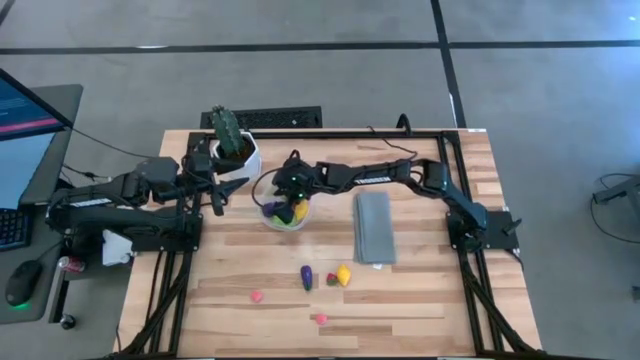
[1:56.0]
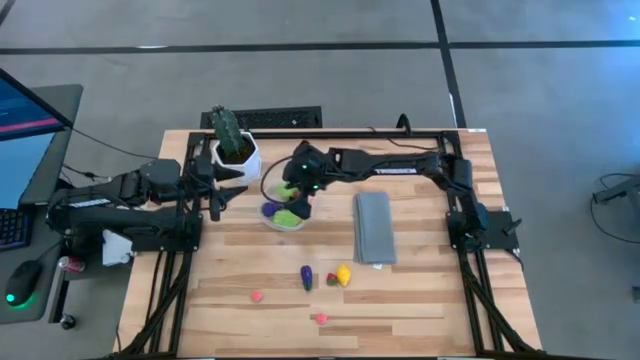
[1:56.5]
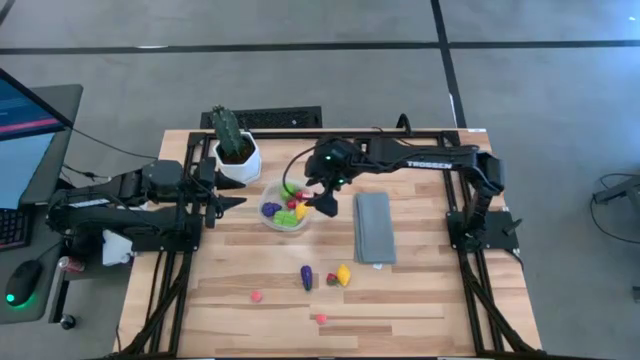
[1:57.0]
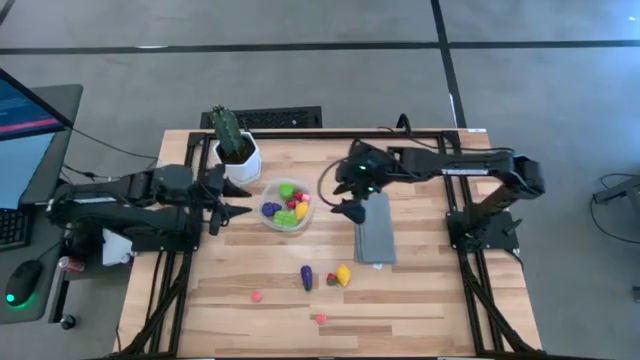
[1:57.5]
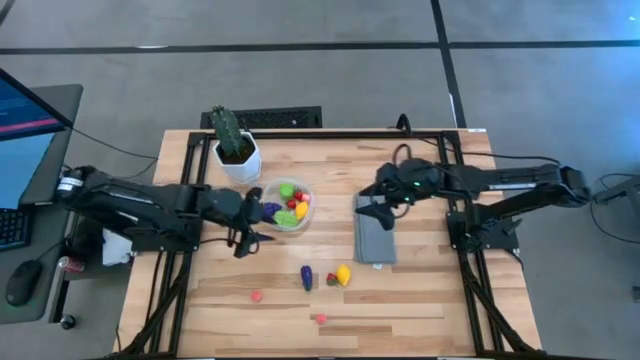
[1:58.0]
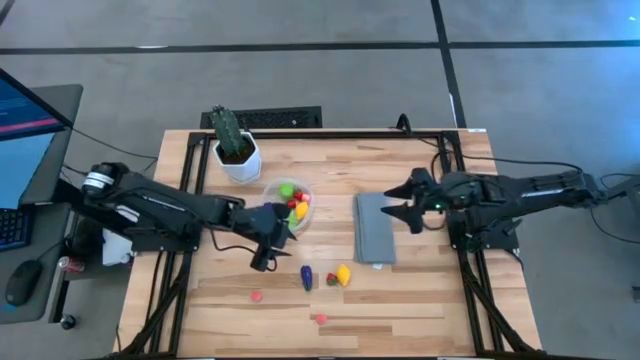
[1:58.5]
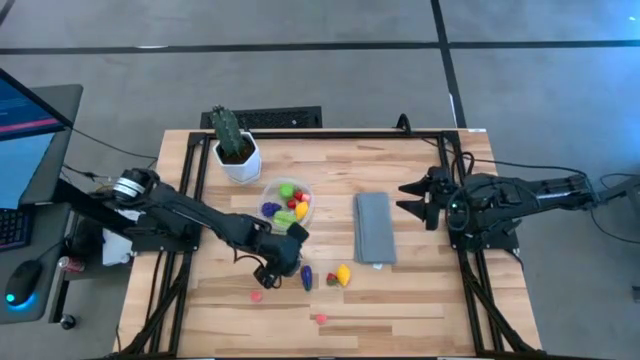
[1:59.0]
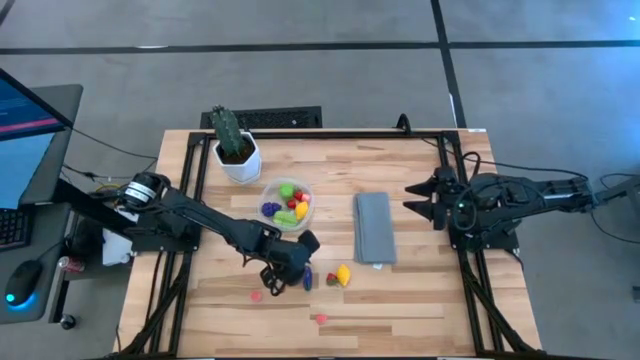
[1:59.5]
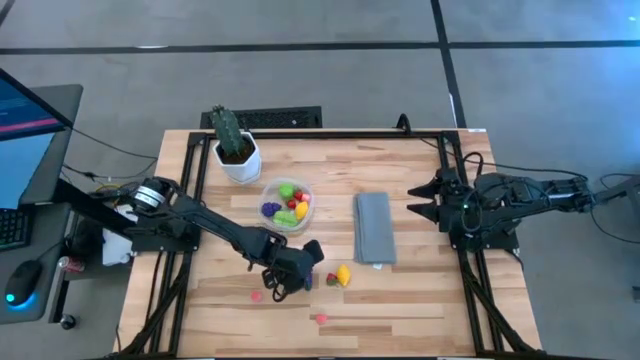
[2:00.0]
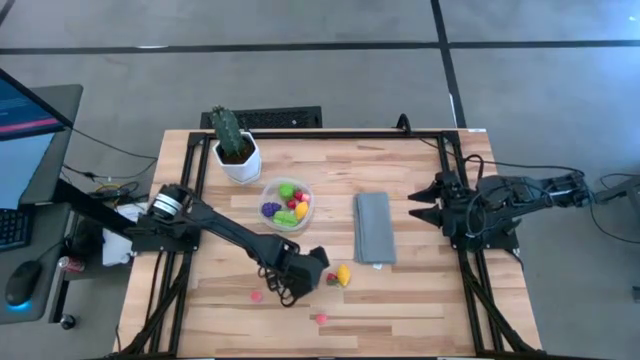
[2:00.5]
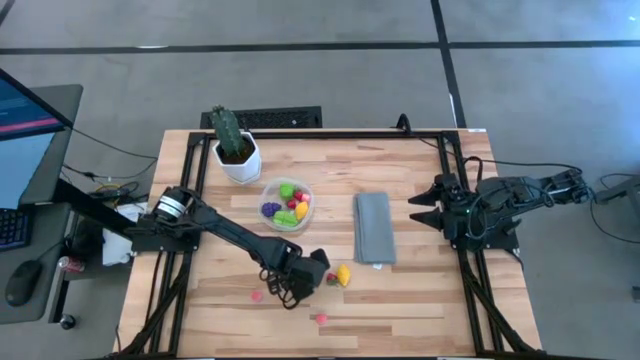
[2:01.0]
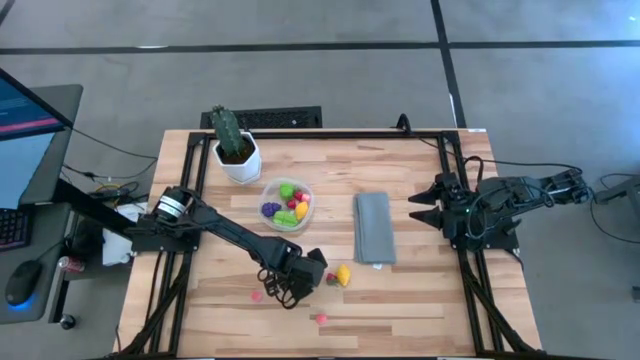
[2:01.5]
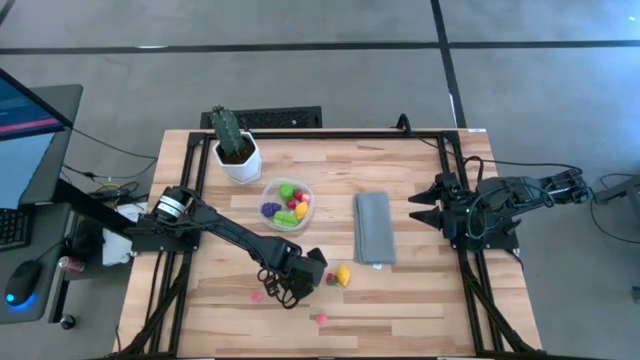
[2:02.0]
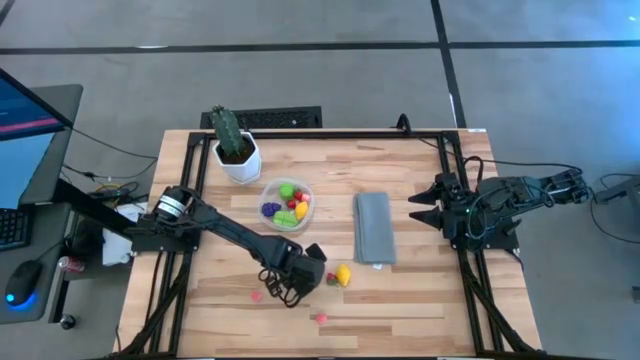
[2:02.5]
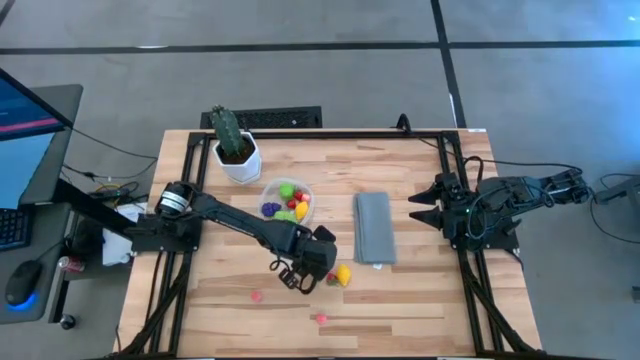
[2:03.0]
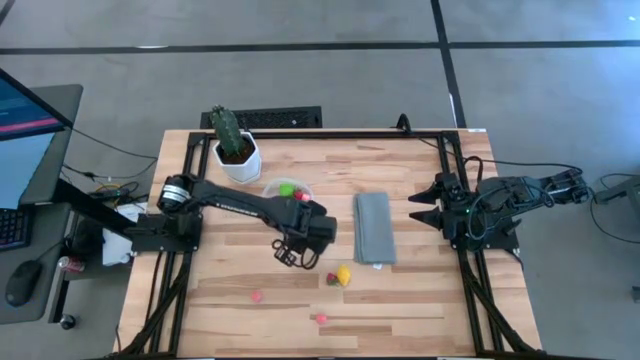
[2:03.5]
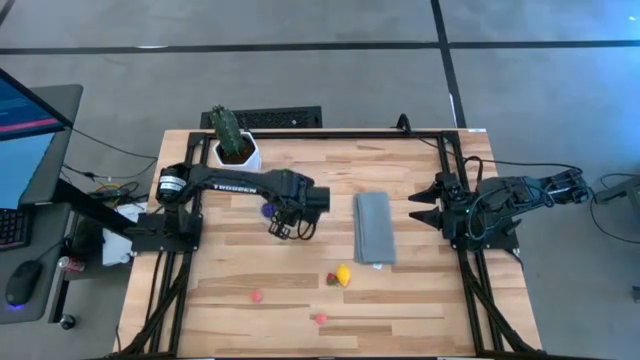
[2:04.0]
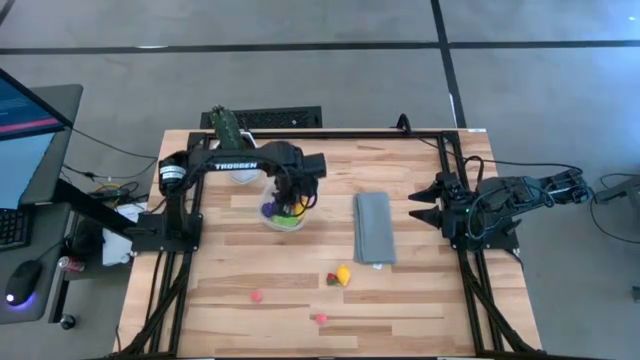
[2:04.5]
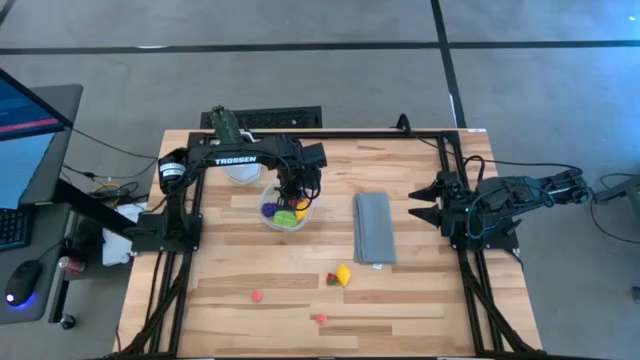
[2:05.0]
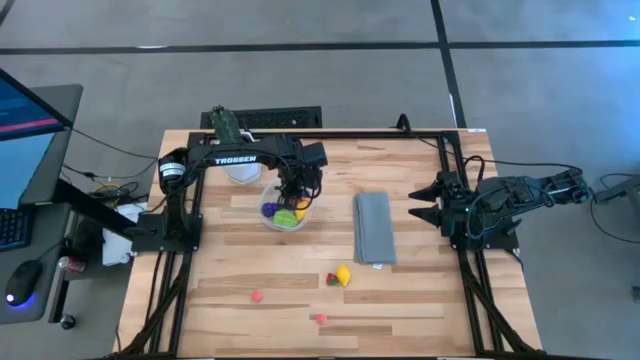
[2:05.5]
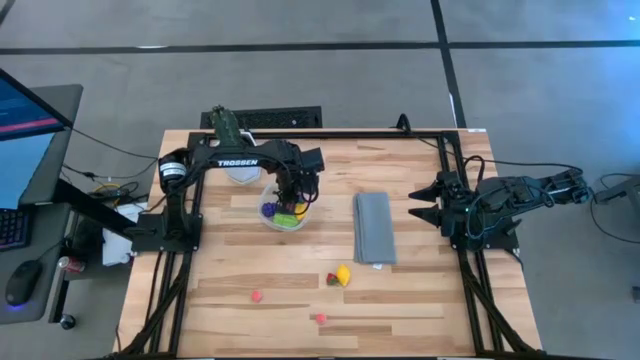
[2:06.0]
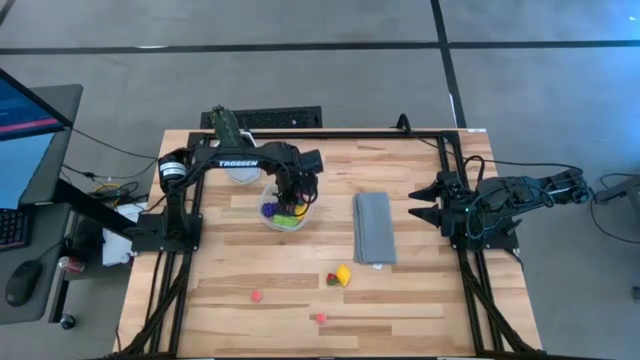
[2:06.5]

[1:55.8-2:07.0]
Task: Pick and placing Produce into tupperware
Put the violet eggplant into the transparent container

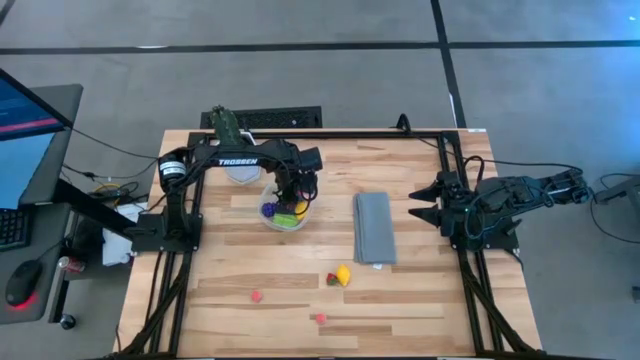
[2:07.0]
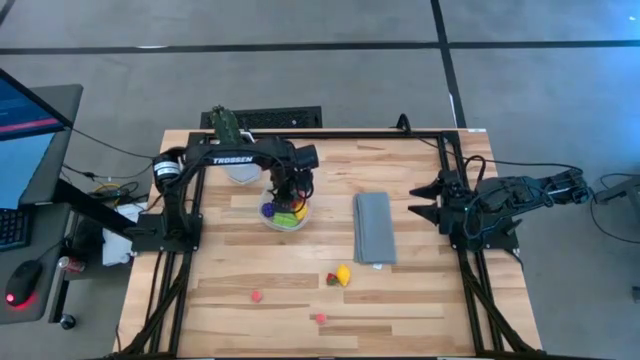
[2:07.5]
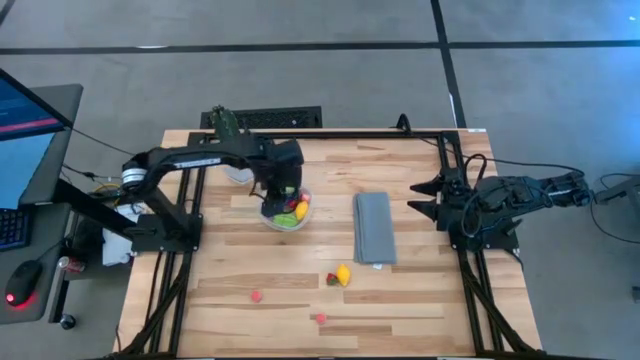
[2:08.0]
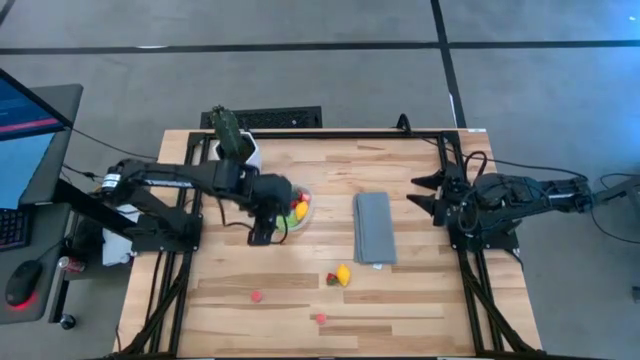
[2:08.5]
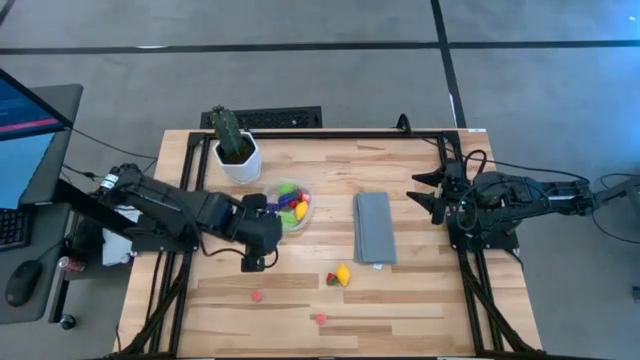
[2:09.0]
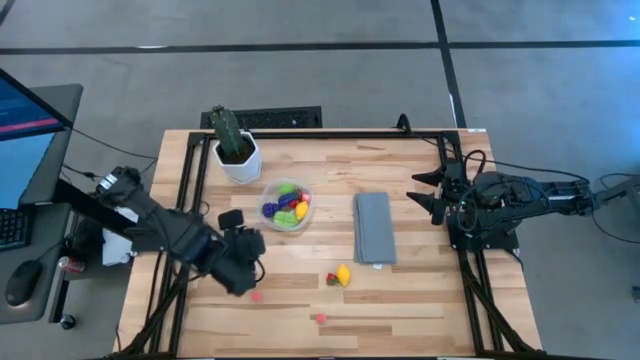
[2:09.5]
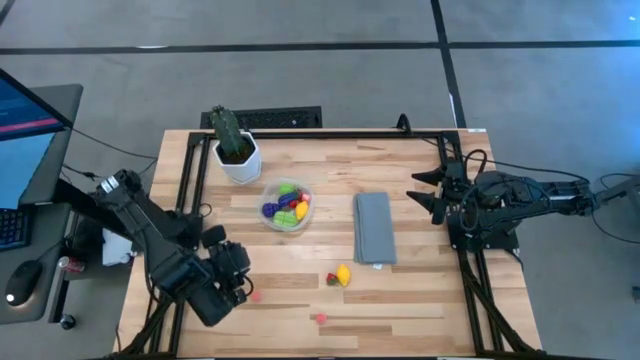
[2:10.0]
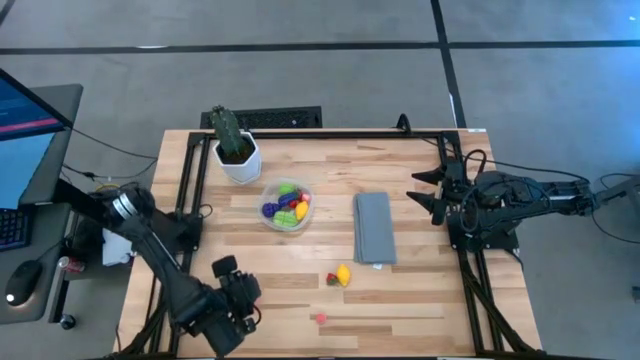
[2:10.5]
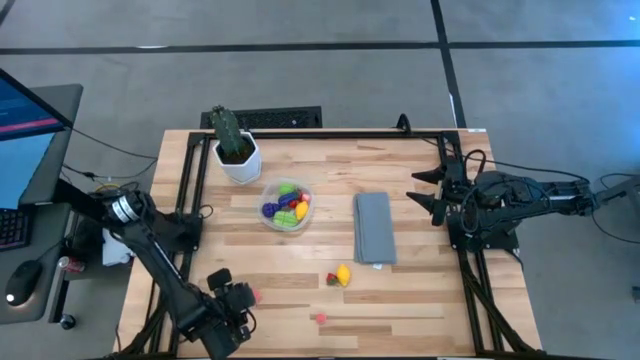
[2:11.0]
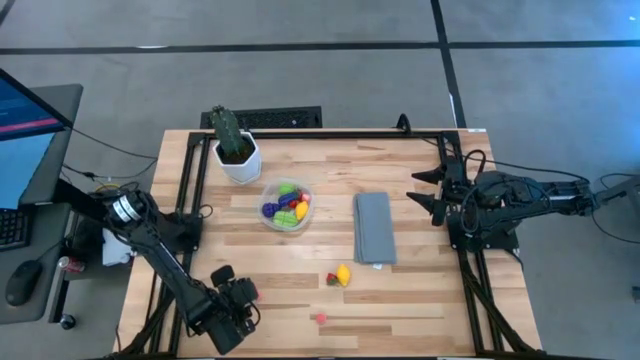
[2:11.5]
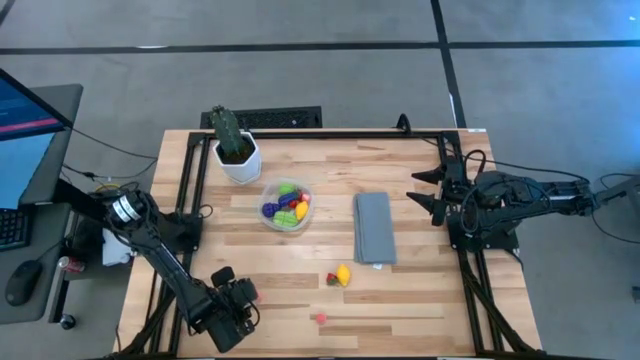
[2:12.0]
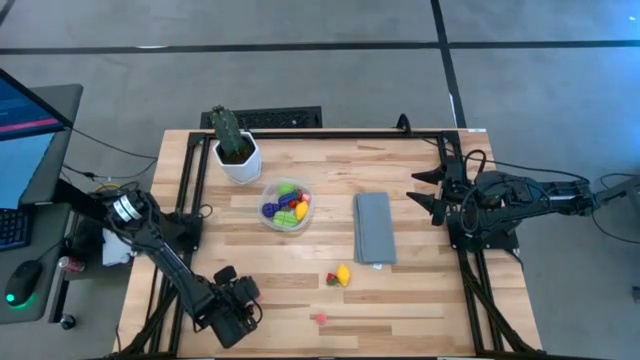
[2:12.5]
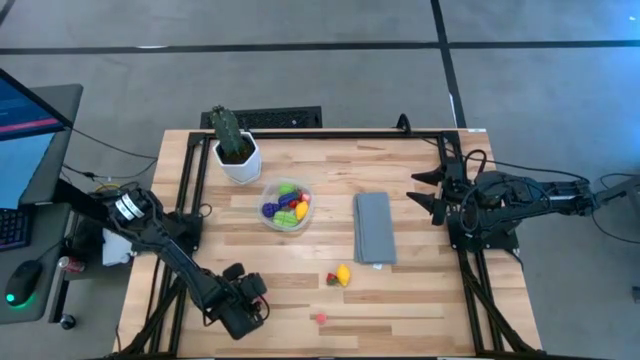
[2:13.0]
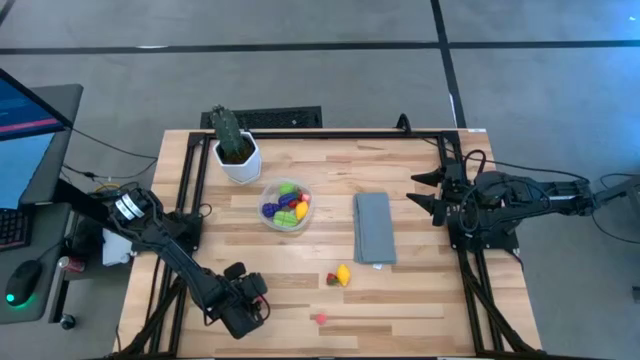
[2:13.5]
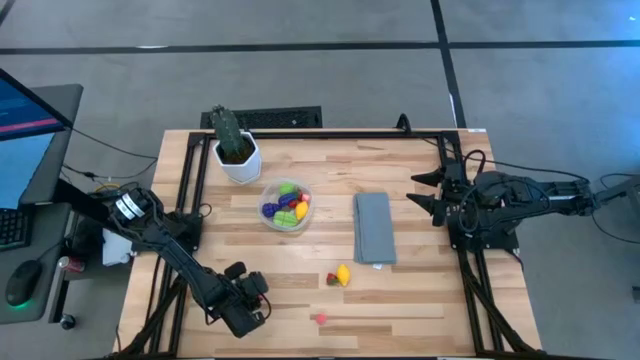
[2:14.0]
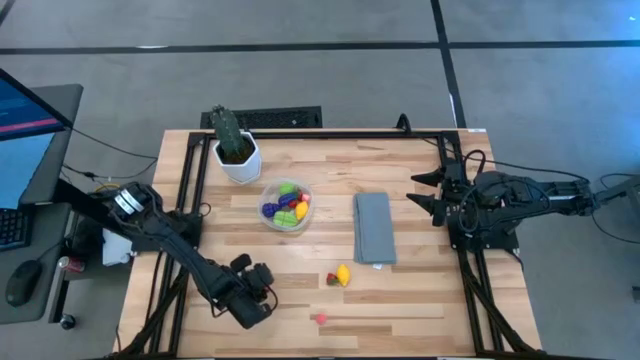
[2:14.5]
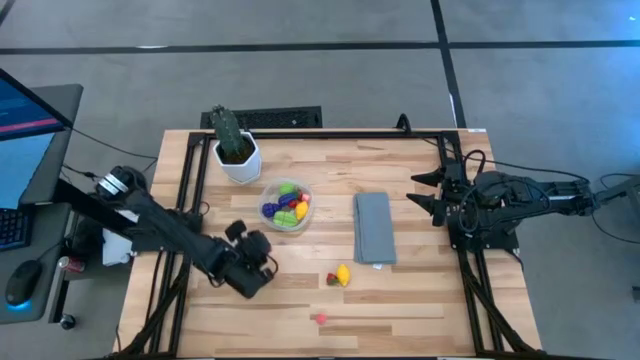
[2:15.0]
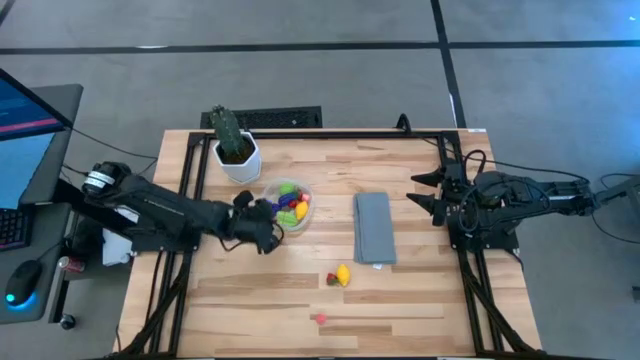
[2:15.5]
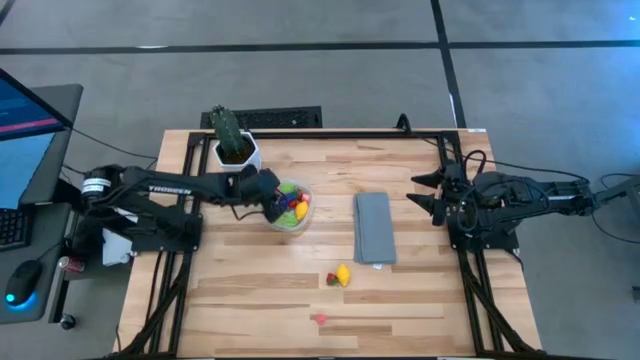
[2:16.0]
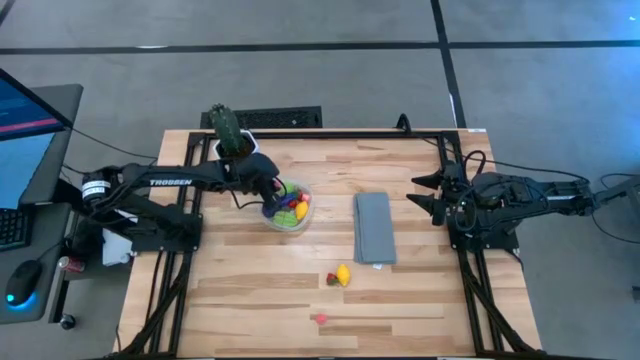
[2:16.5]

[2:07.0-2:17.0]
Put the left pink peach into the transparent container

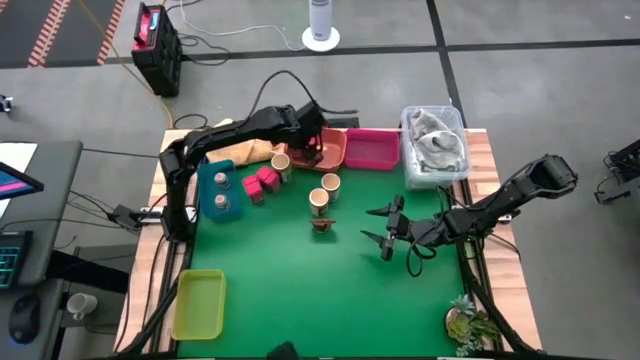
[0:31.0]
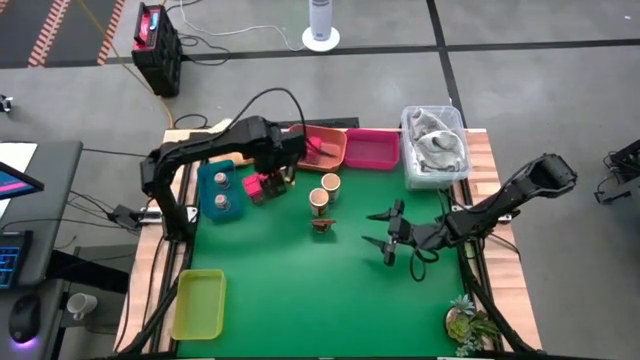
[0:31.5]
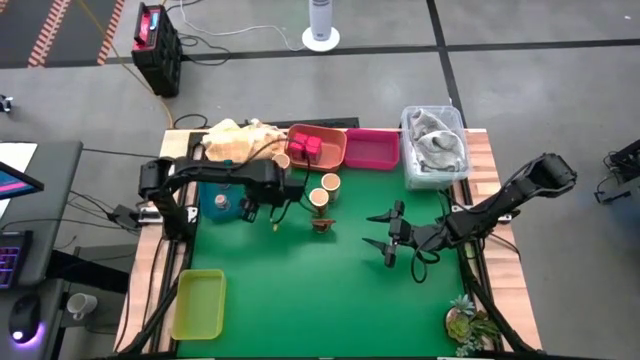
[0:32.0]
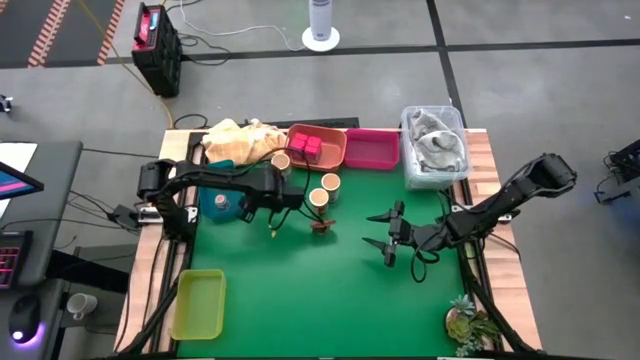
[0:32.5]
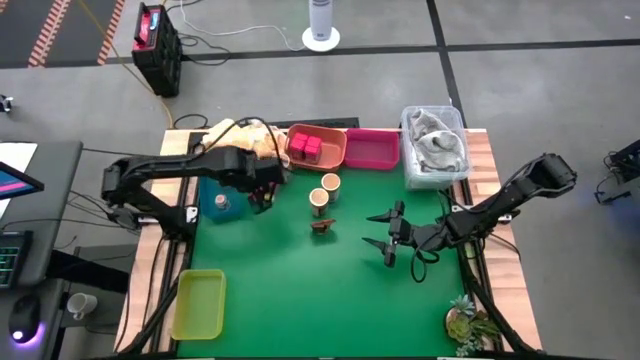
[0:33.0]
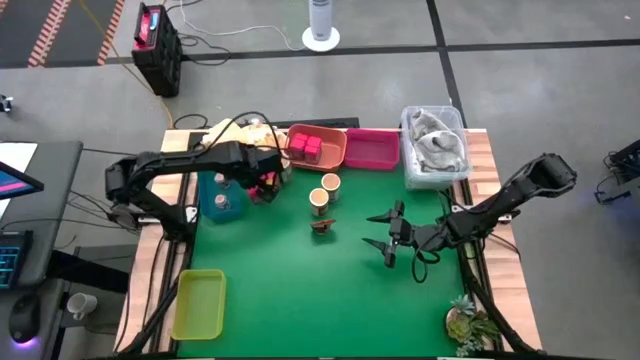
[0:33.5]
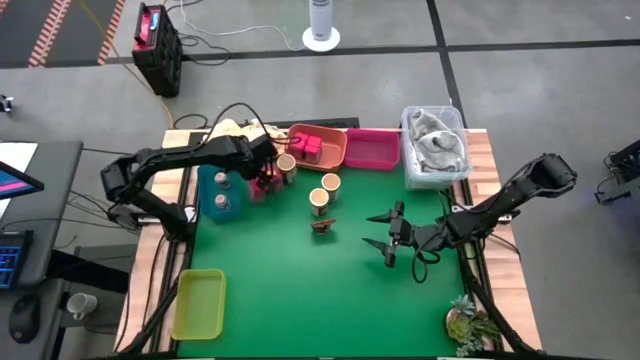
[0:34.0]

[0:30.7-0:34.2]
Task: Sort spices by type
Put the left red seasoning can into the orange bin
